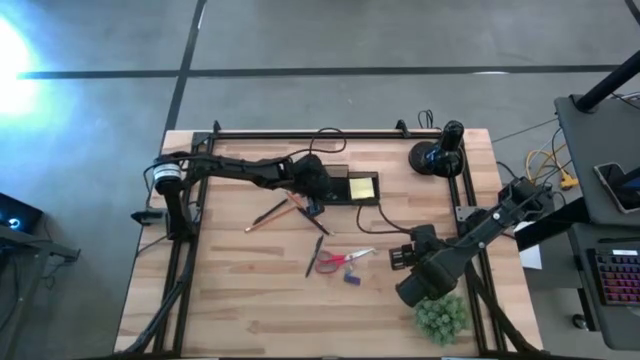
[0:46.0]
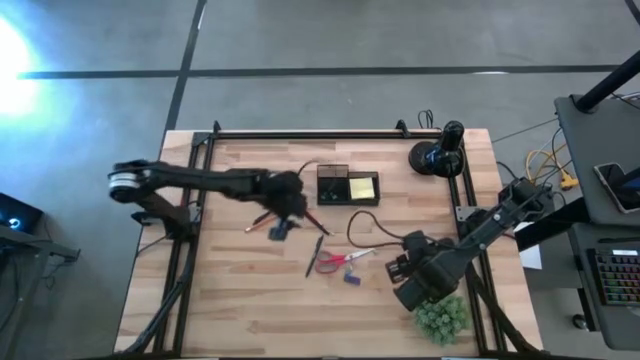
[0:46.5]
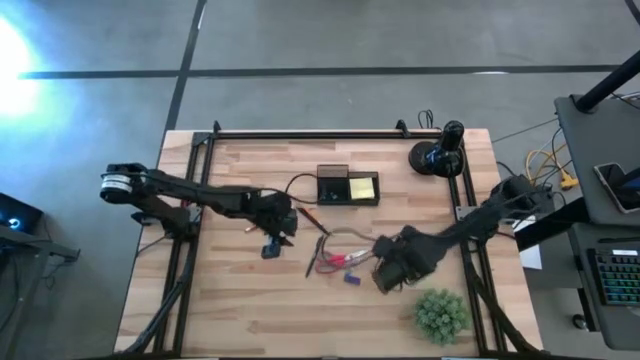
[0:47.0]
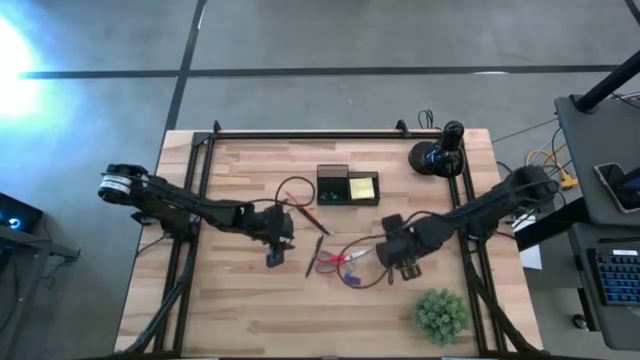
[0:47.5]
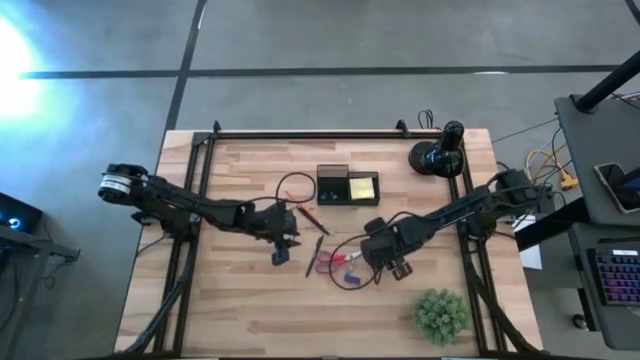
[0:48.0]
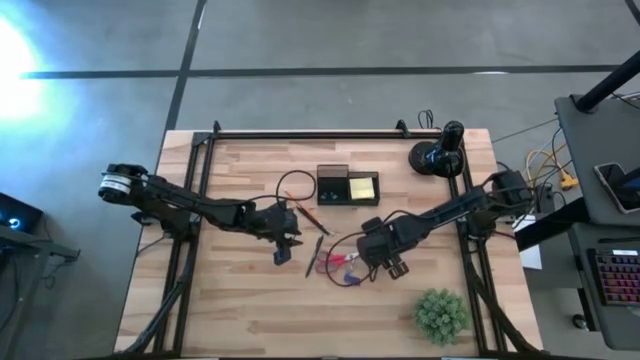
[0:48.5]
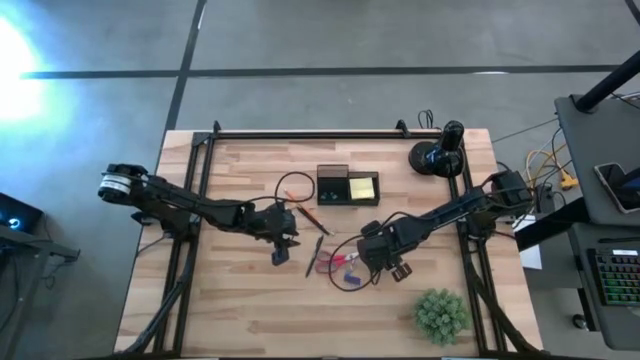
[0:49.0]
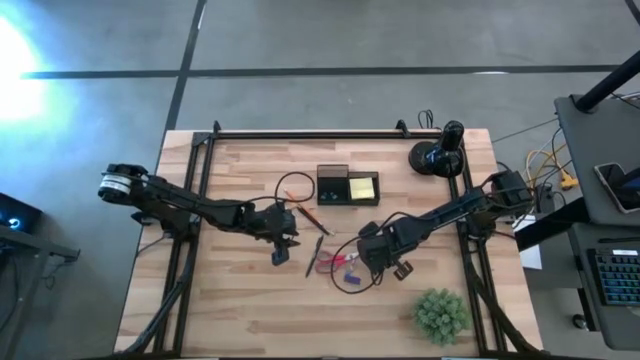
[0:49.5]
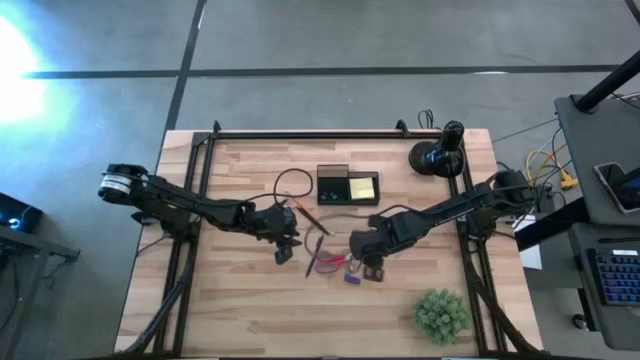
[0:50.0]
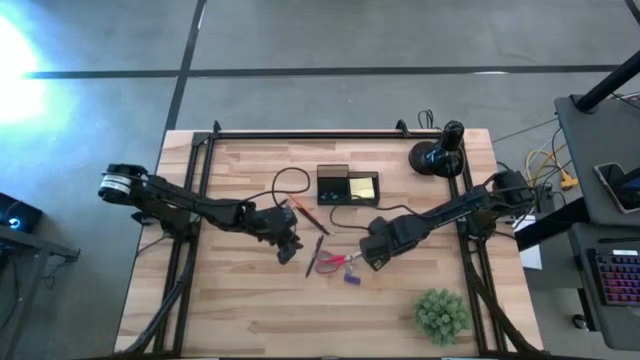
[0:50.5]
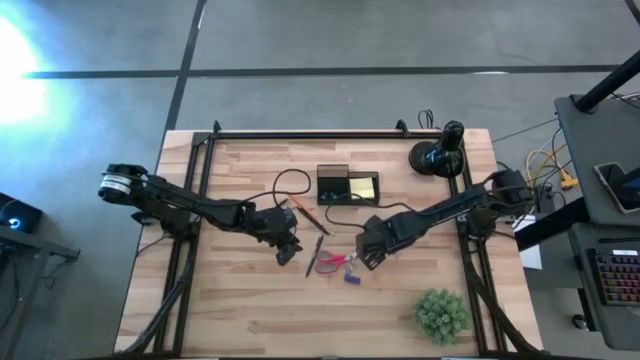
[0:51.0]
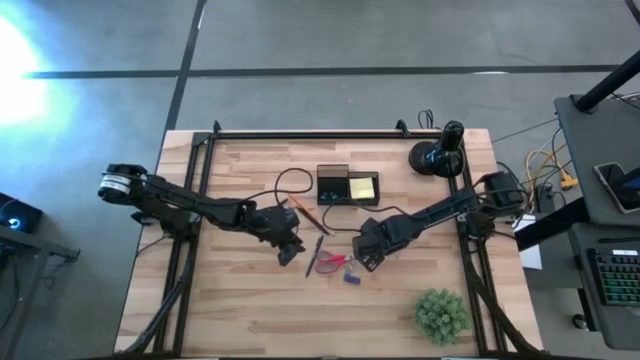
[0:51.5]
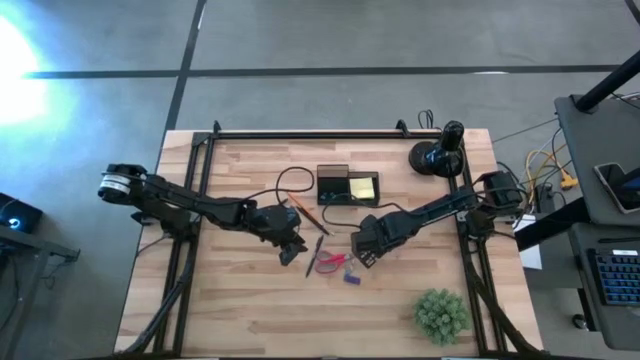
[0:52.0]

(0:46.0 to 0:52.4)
Task: Pick and place office supplies into organizer
Put the right yellow binder clip into the desk organizer

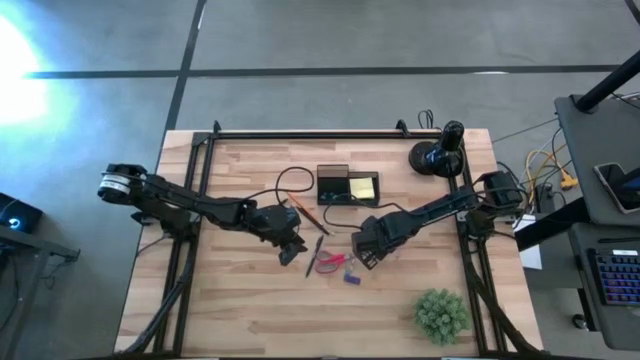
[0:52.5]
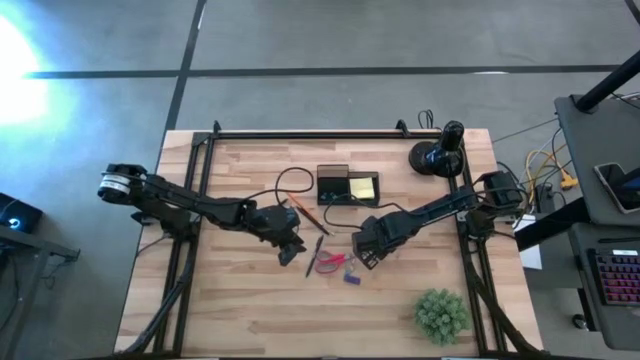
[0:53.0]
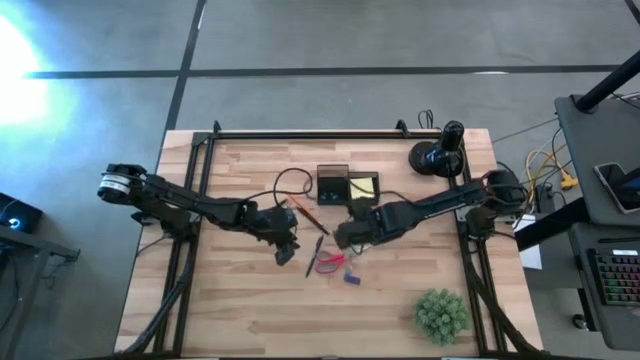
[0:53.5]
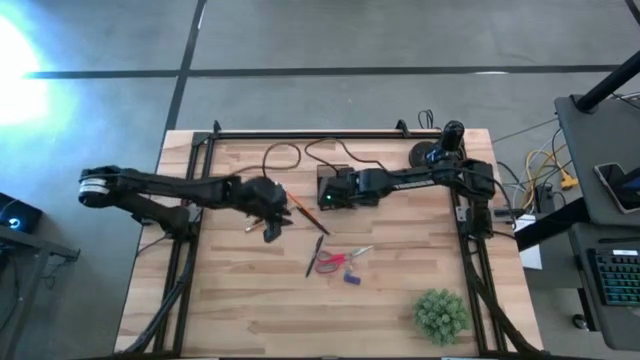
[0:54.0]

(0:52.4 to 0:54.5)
Put the right yellow binder clip into the desk organizer

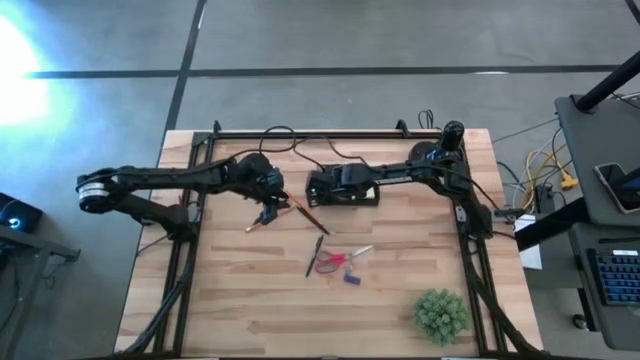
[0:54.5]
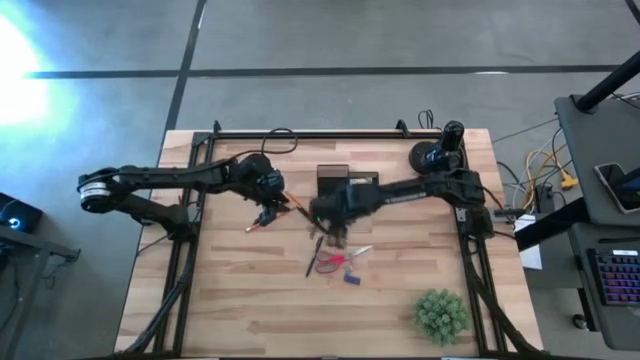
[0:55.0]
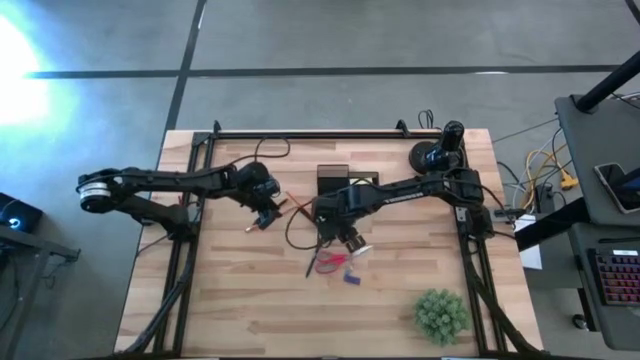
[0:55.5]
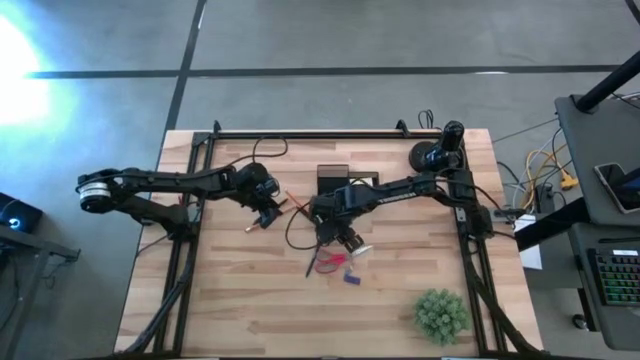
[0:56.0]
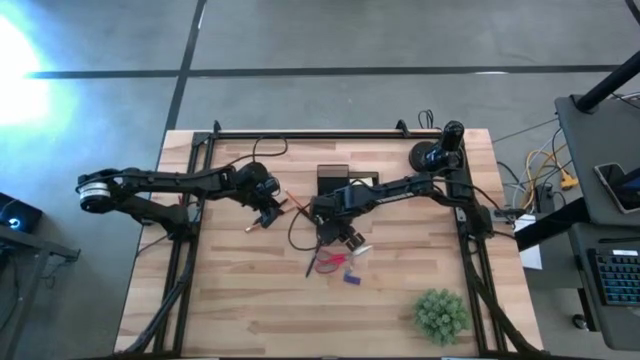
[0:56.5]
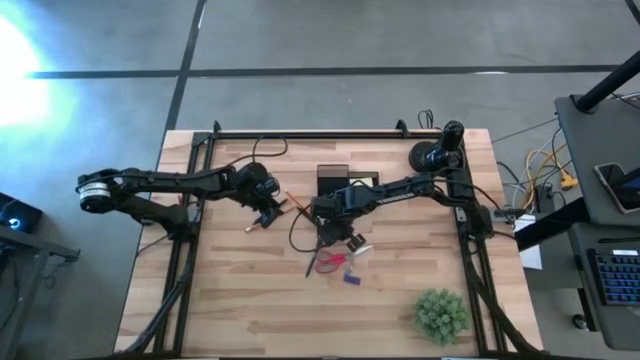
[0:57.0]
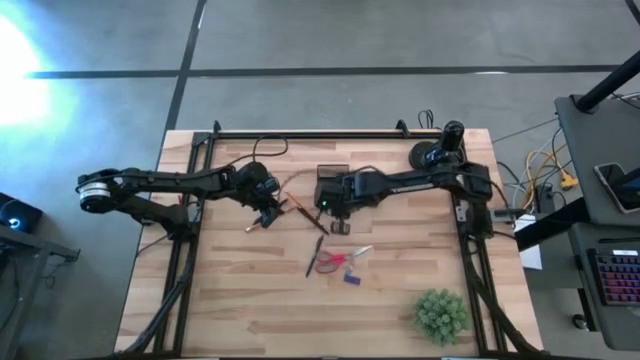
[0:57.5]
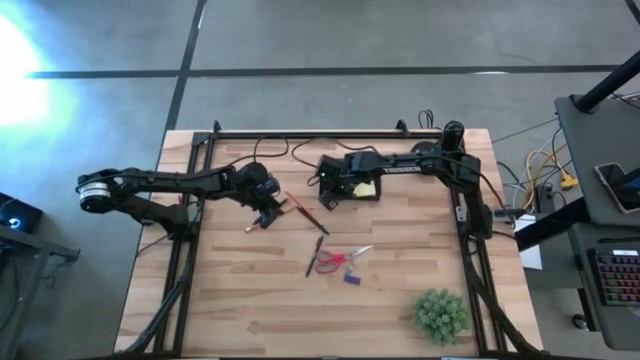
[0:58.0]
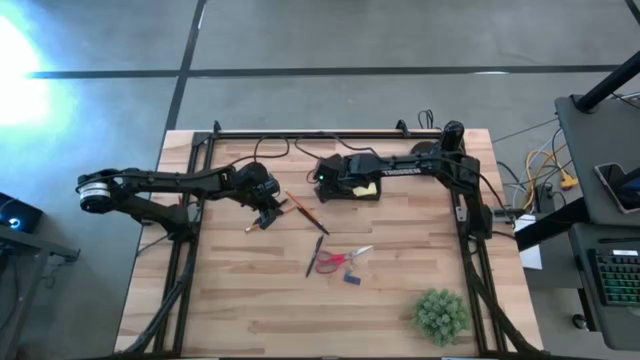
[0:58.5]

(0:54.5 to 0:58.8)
Put the top yellow binder clip into the desk organizer

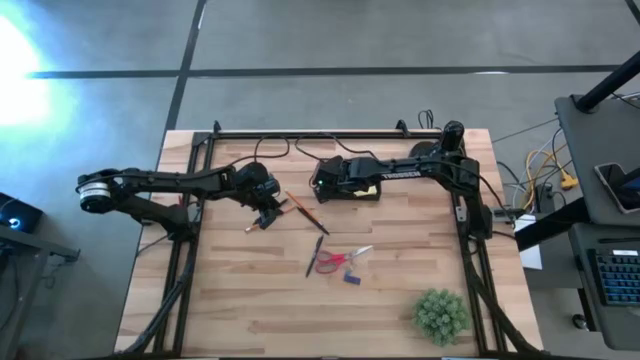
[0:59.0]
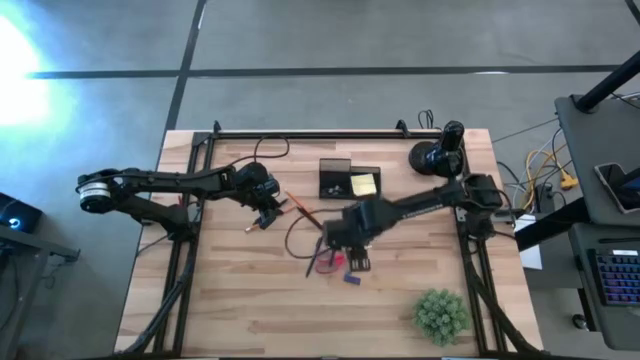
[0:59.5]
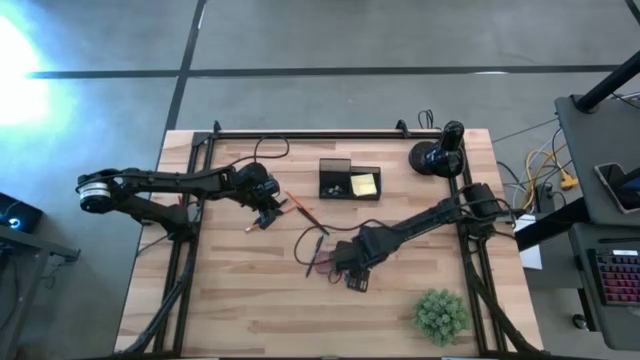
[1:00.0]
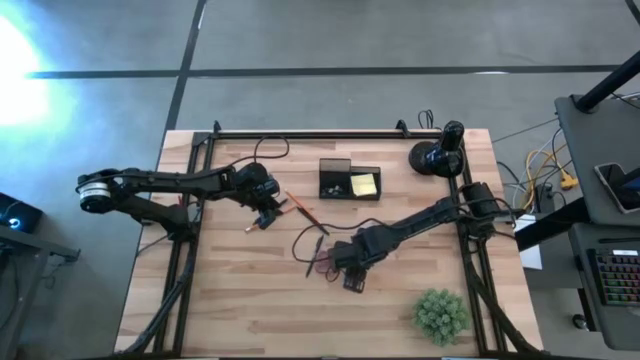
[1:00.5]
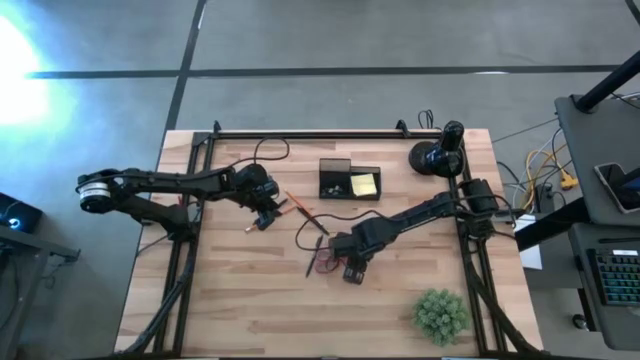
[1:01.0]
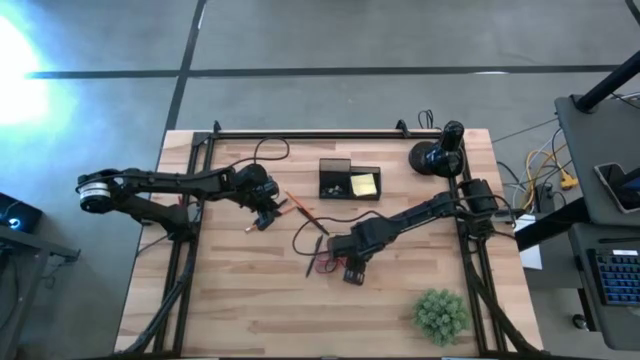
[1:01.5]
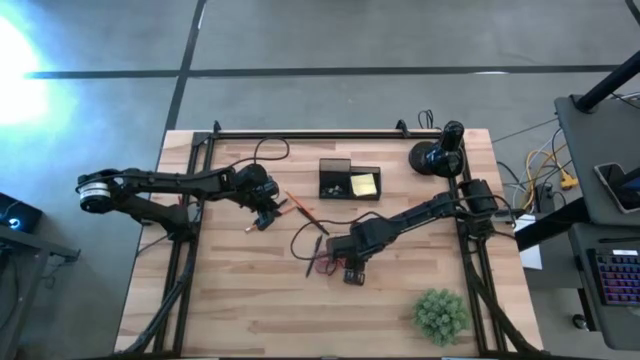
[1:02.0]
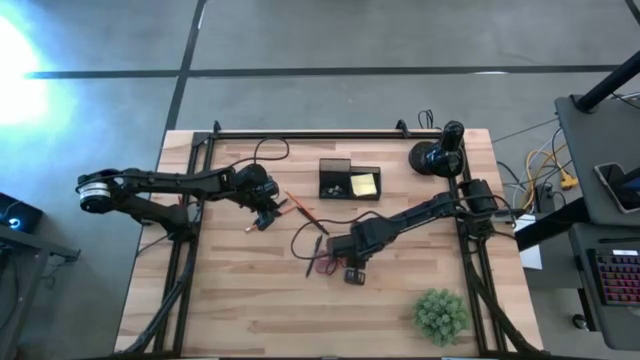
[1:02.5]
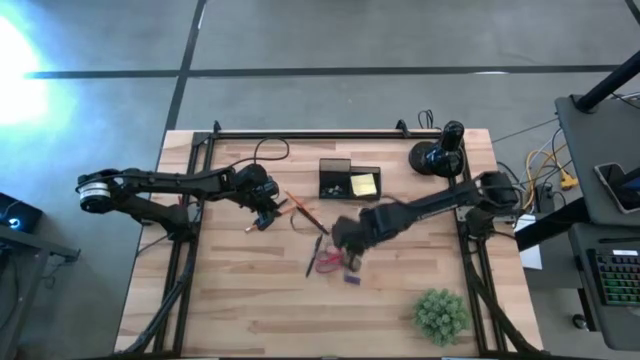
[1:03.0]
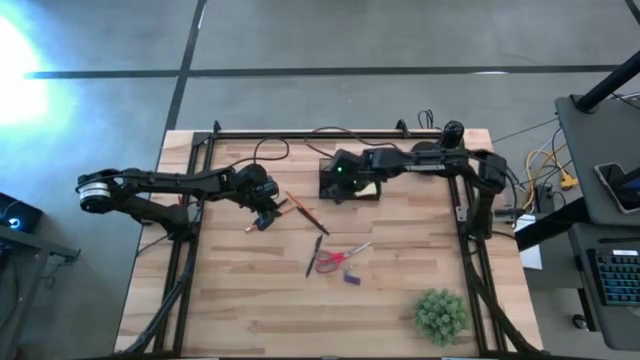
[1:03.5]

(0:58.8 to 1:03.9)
Put the pink binder clip into the desk organizer

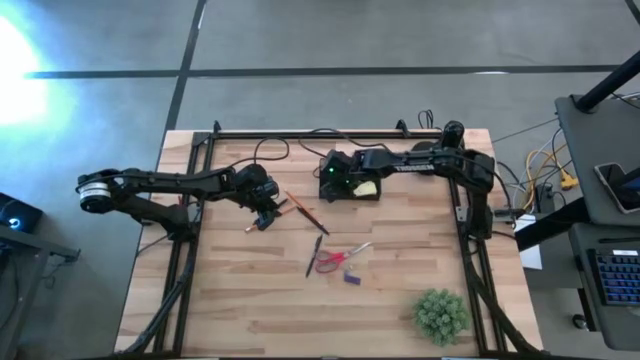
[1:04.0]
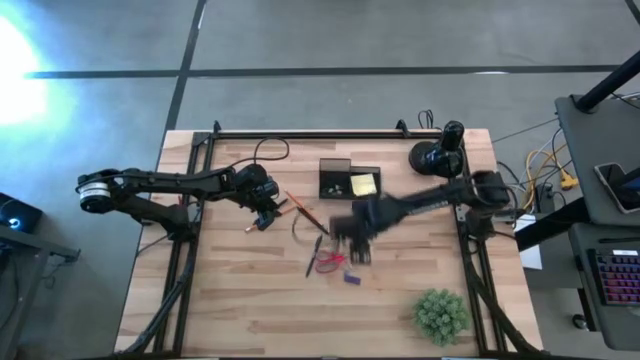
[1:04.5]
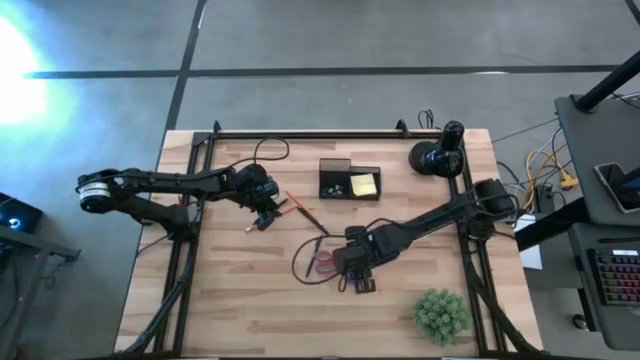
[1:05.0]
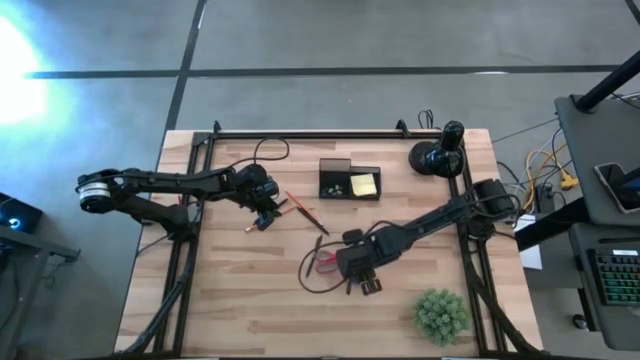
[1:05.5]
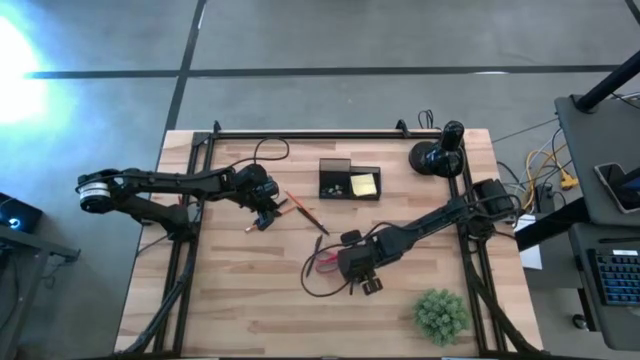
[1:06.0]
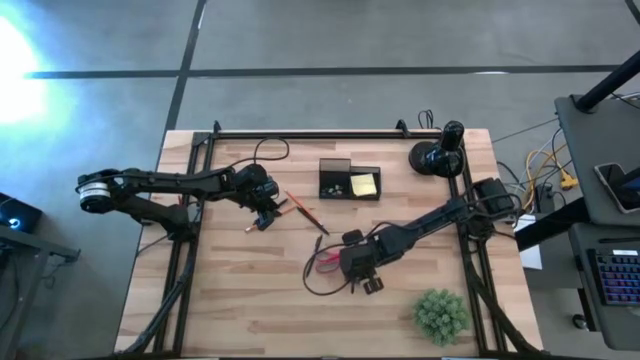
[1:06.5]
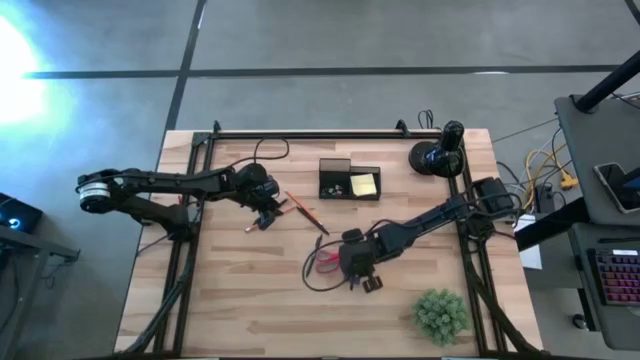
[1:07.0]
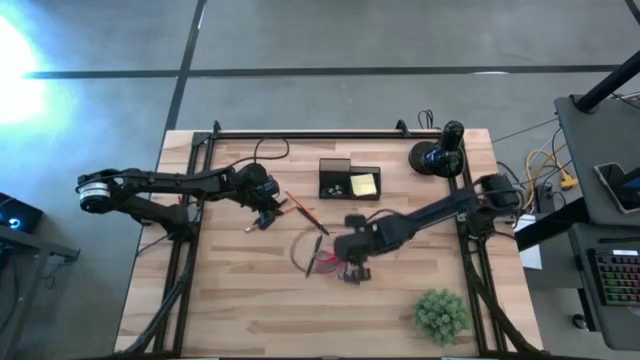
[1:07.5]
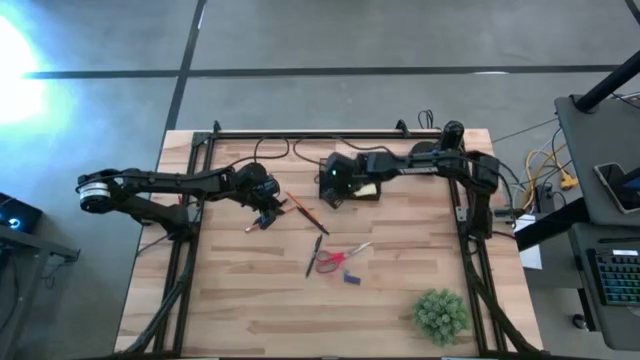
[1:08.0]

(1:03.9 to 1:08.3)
Put the yellow binder clip into the desk organizer
